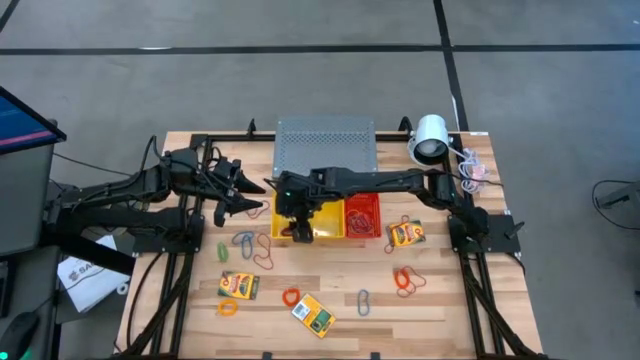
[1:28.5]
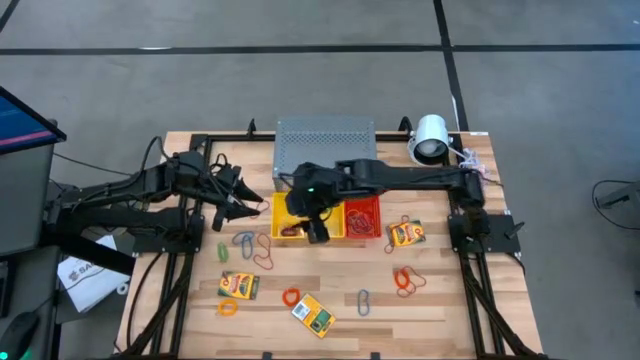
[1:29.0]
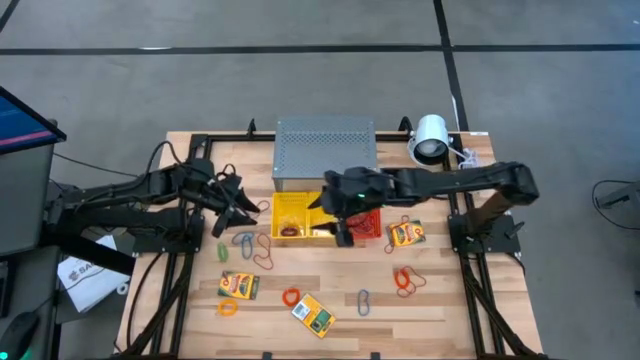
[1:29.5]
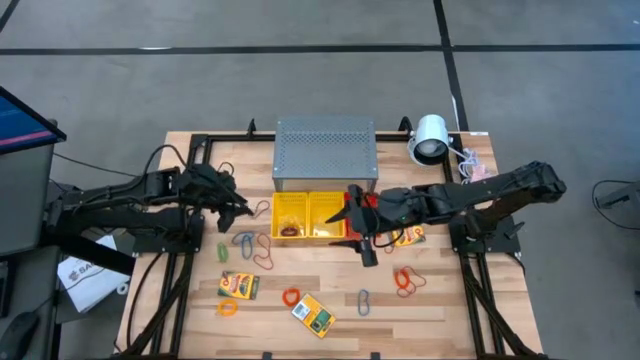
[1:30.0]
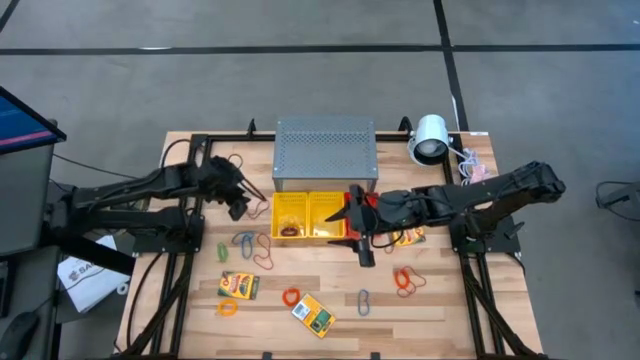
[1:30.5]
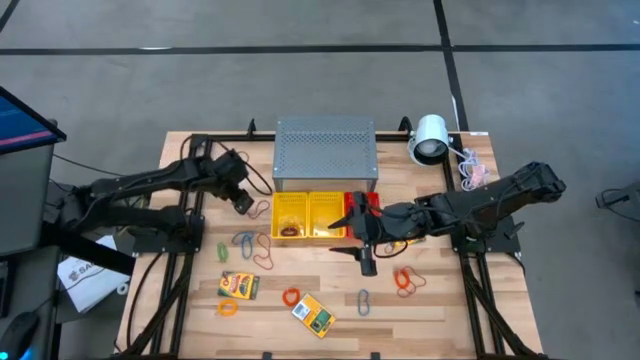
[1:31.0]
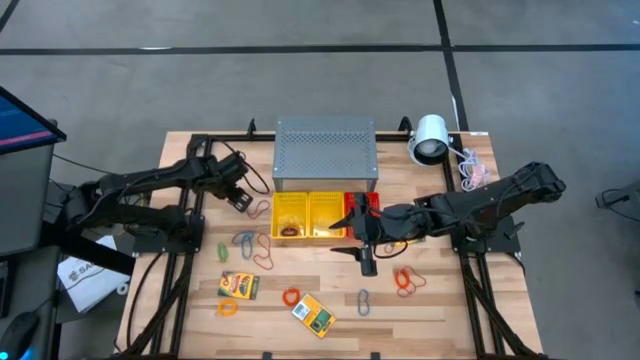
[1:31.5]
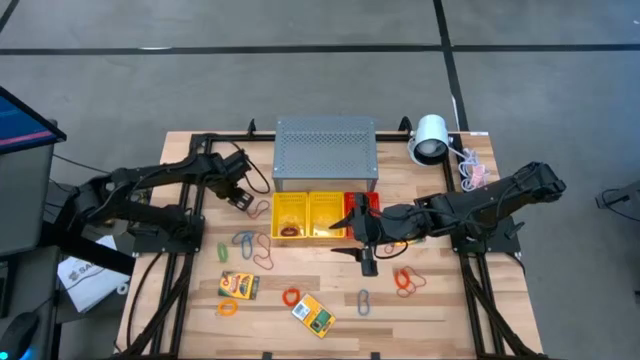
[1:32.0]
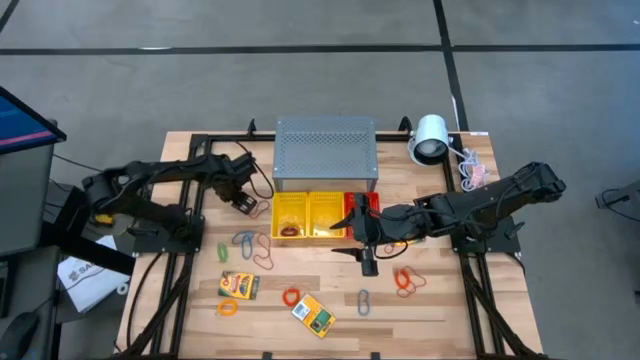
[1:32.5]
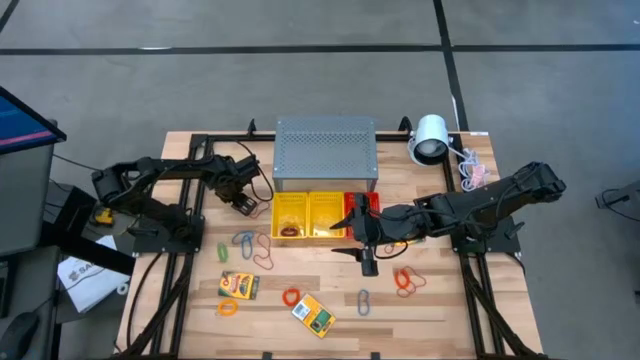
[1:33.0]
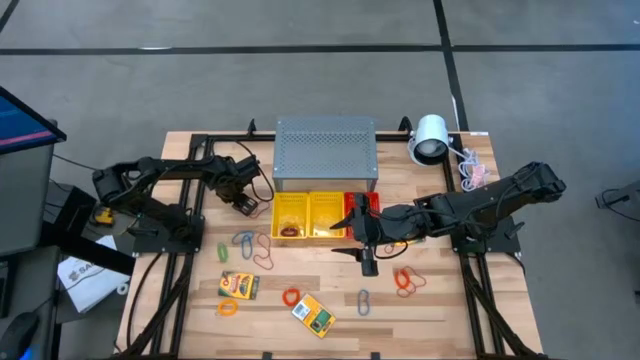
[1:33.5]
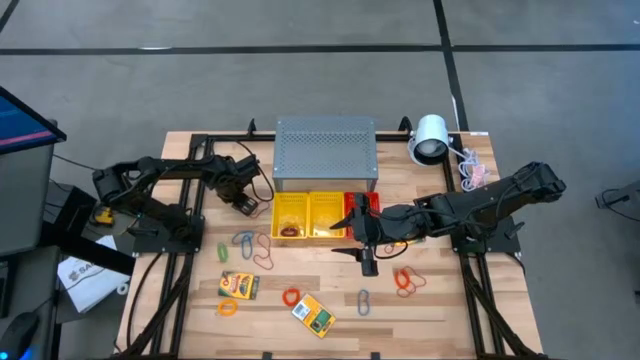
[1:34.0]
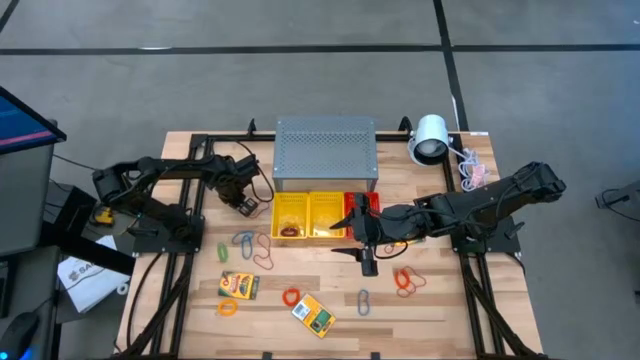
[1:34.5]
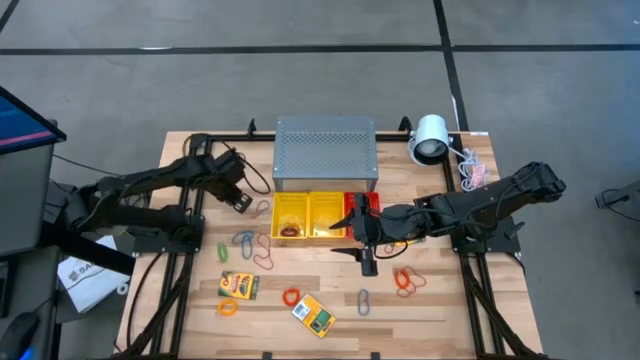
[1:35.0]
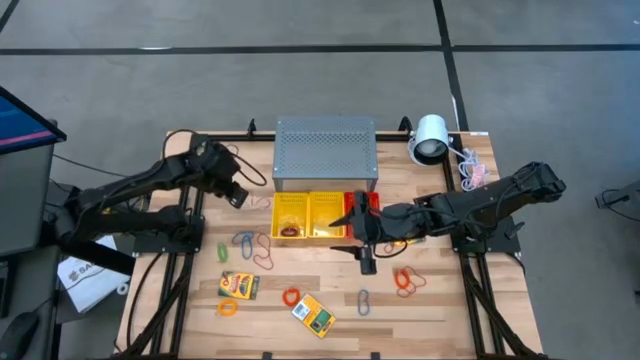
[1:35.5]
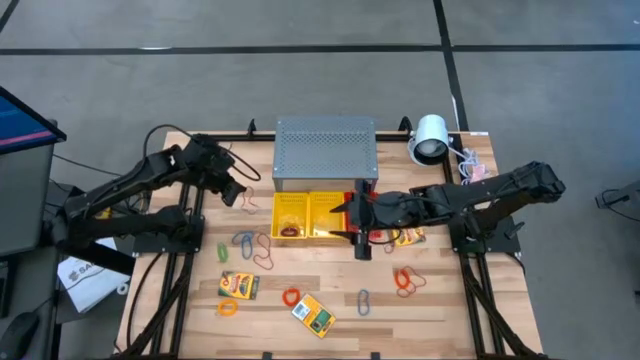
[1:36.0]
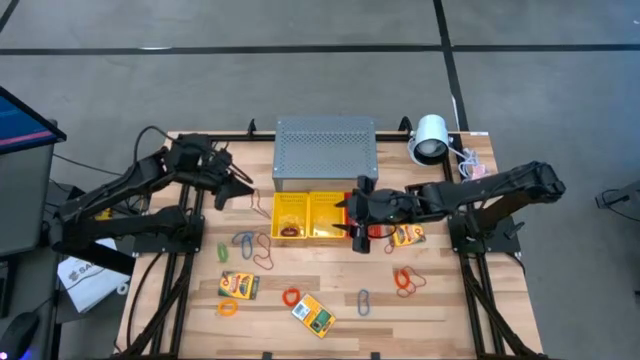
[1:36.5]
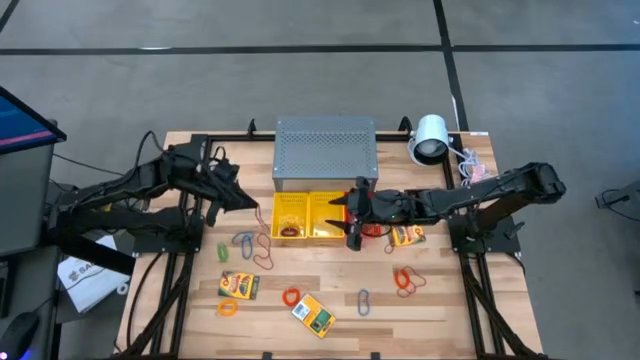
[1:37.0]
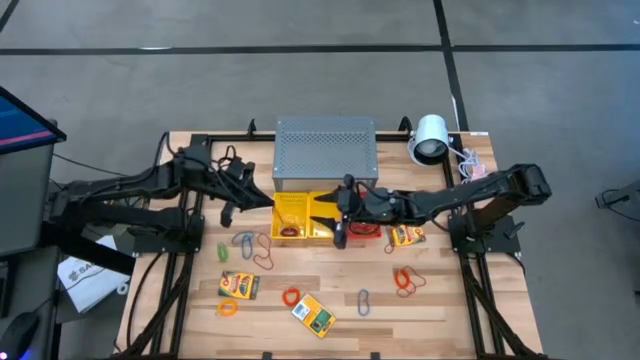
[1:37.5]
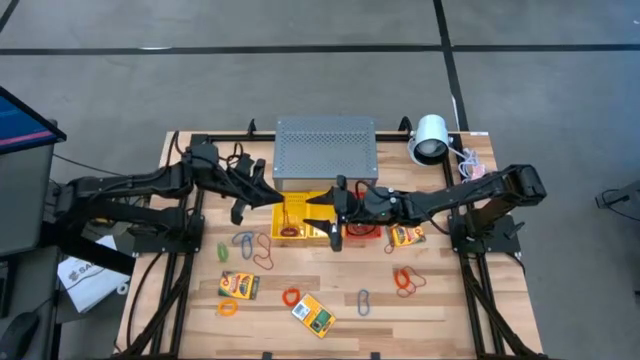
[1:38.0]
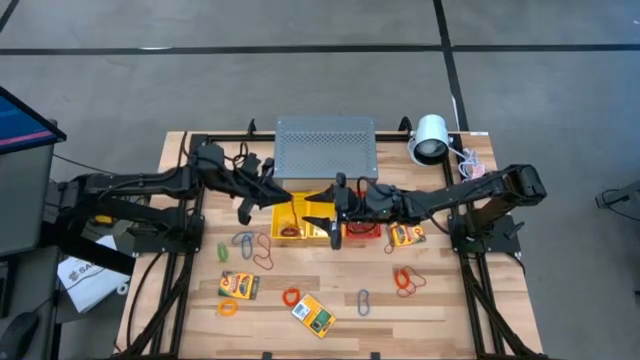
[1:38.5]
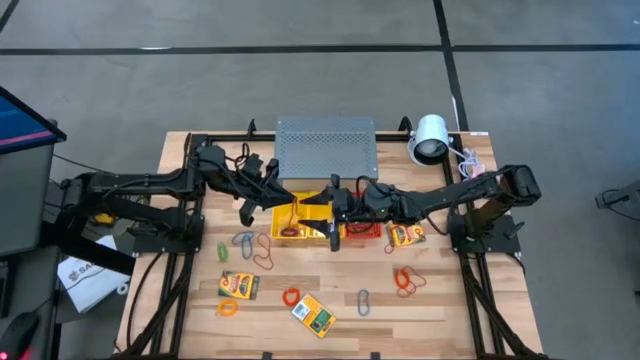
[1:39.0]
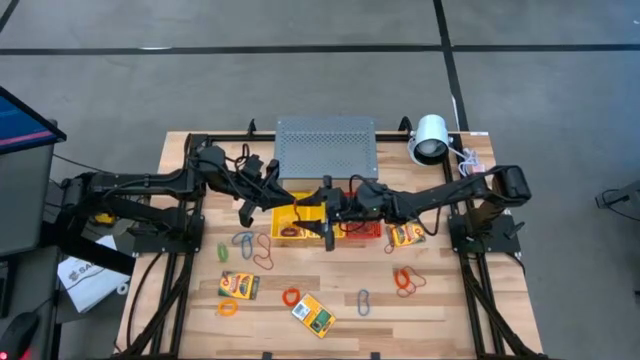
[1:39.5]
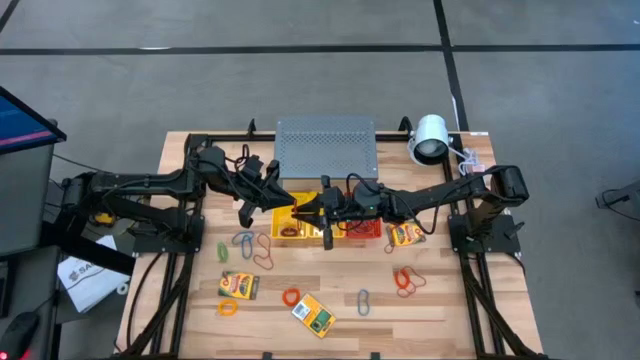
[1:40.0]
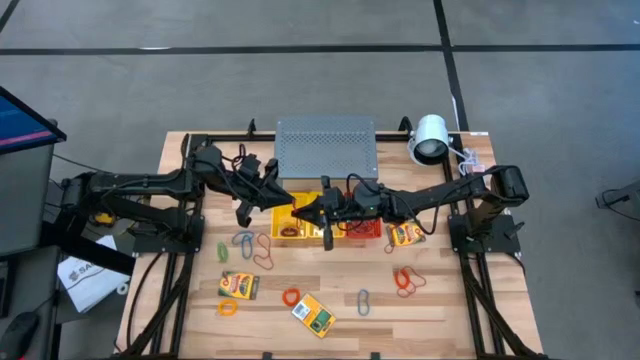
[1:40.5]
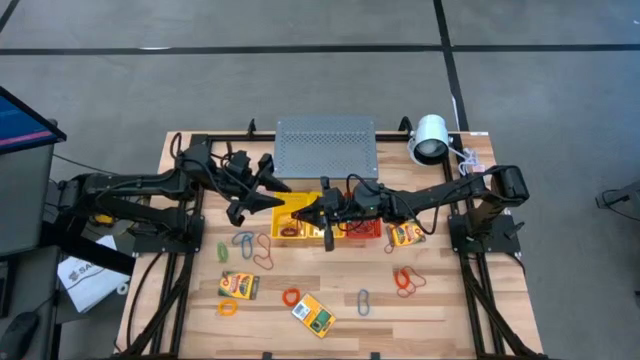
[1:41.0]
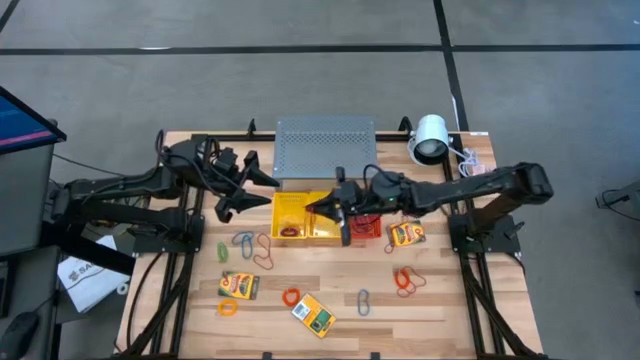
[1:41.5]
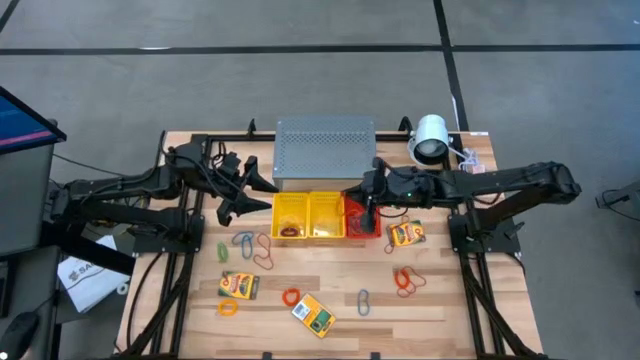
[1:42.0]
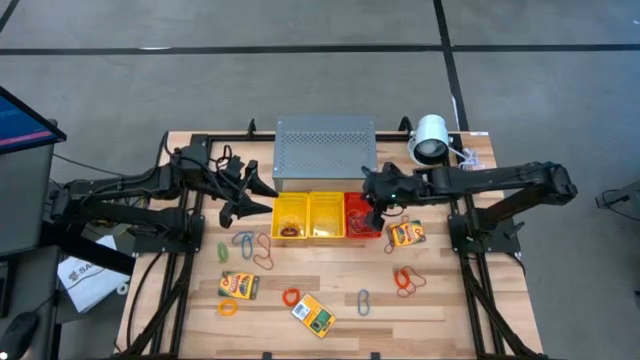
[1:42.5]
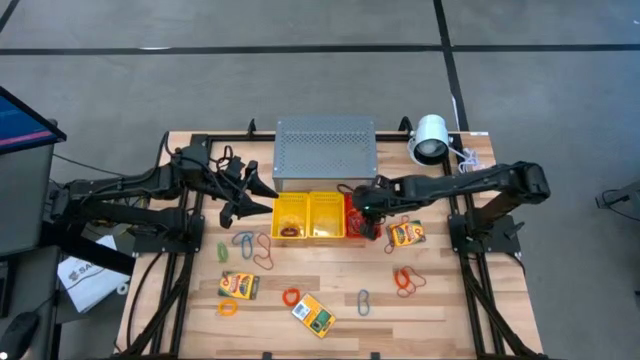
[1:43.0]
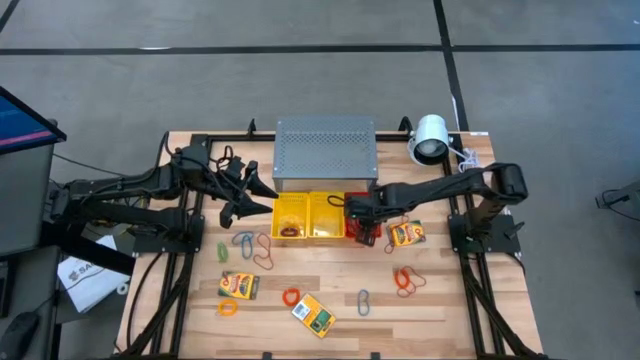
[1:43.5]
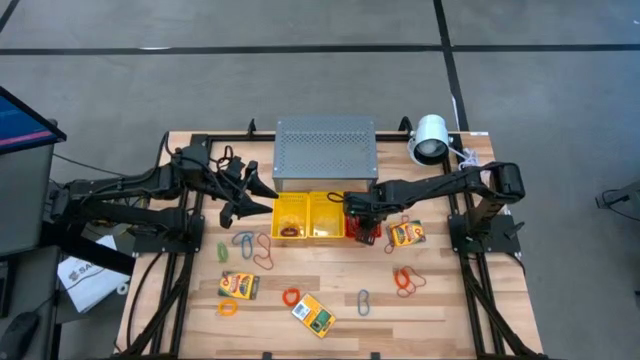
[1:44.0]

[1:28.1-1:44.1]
Task: Pick & Place Office Desk Supplies
Put the red rubber band into the red bin

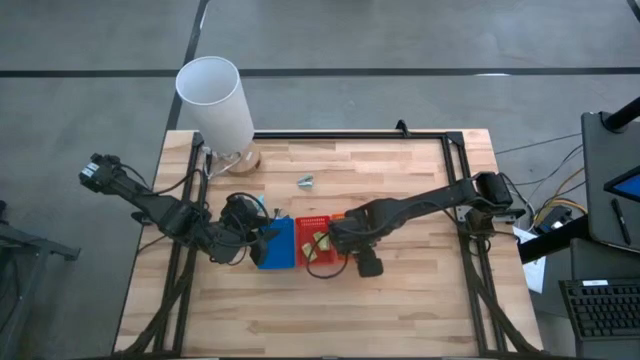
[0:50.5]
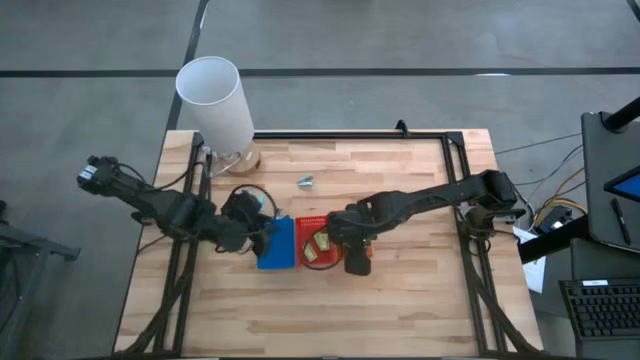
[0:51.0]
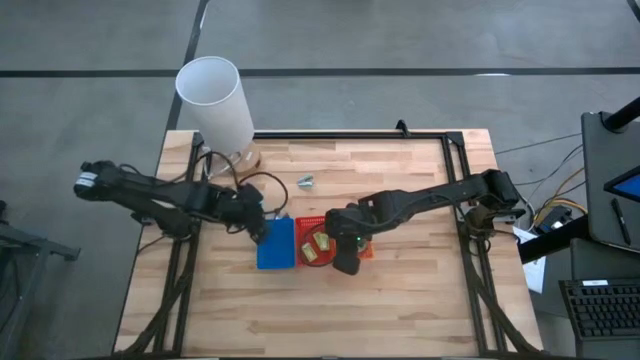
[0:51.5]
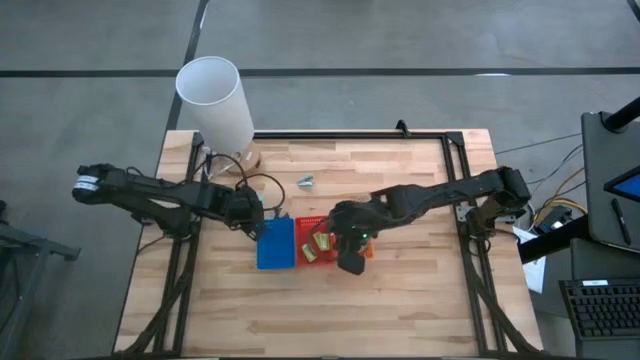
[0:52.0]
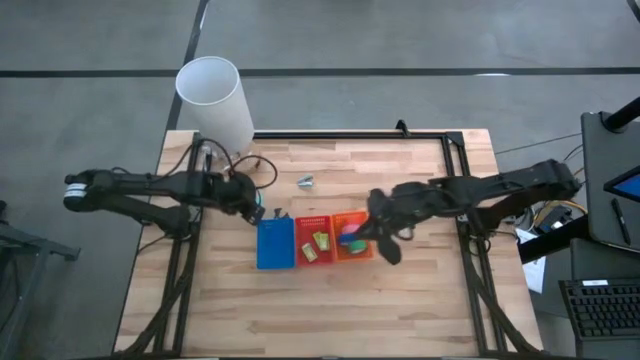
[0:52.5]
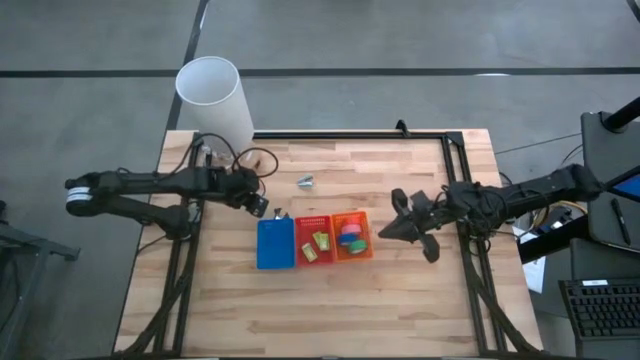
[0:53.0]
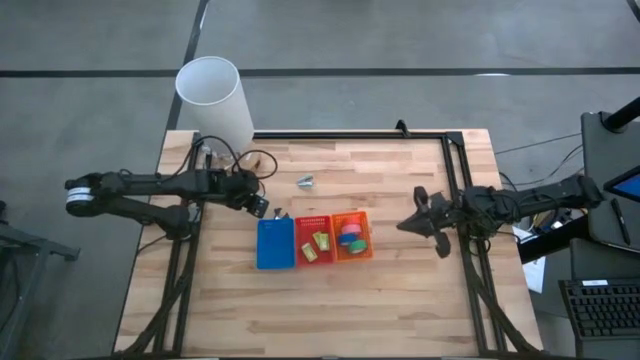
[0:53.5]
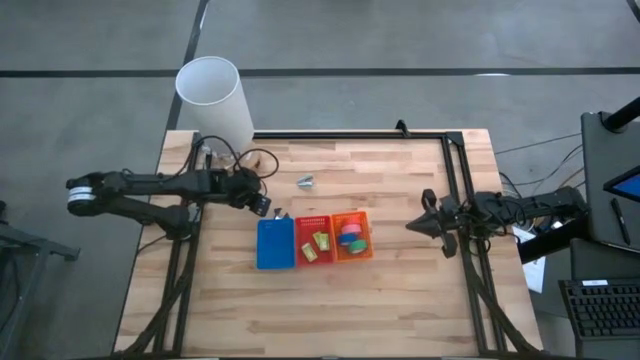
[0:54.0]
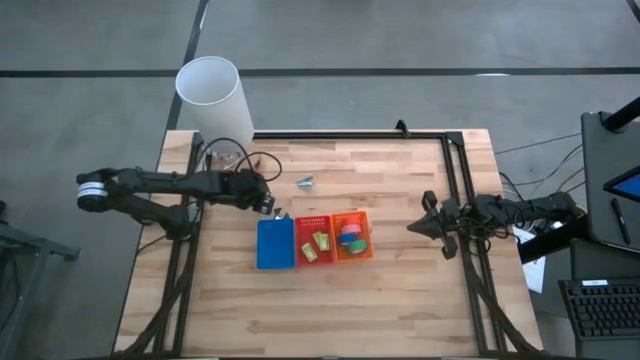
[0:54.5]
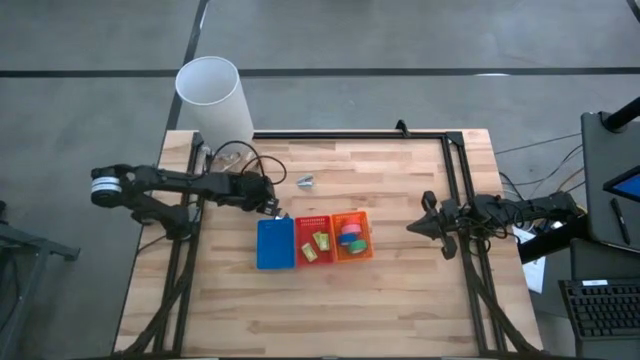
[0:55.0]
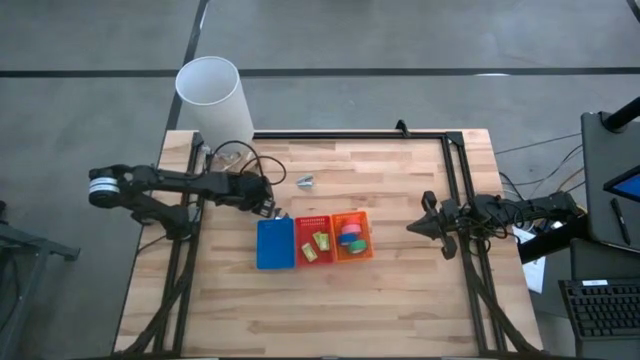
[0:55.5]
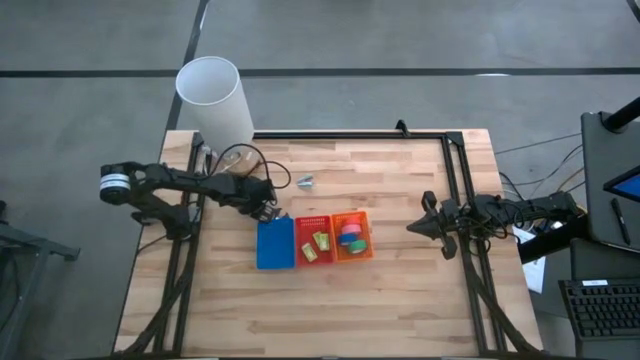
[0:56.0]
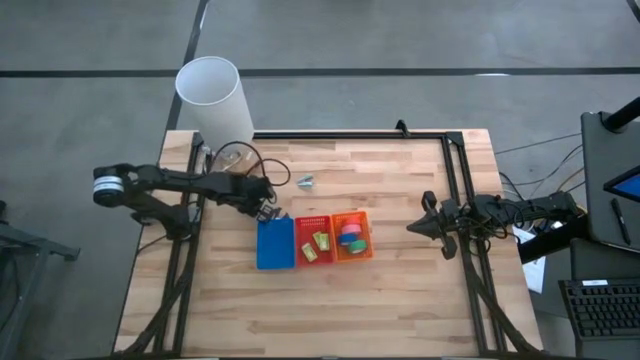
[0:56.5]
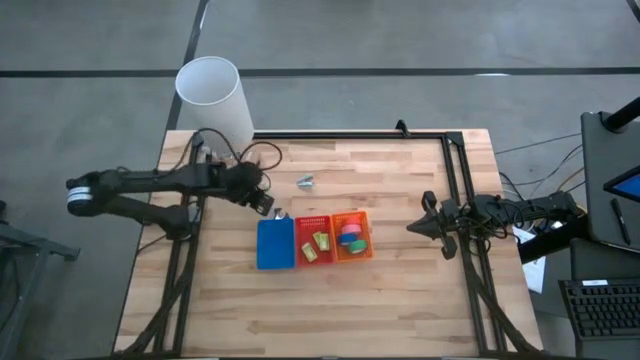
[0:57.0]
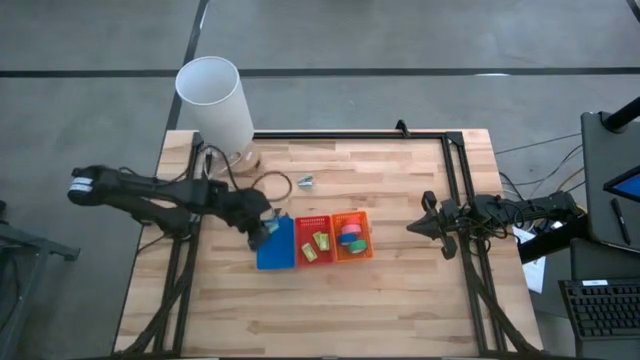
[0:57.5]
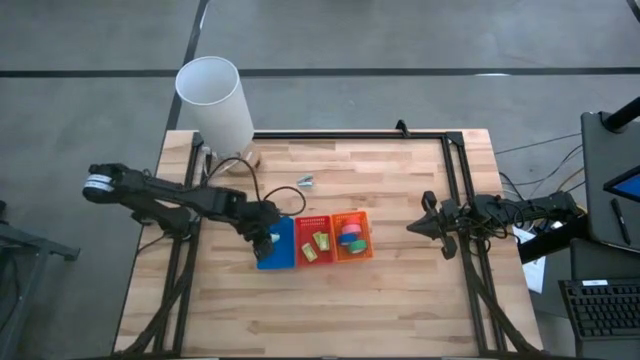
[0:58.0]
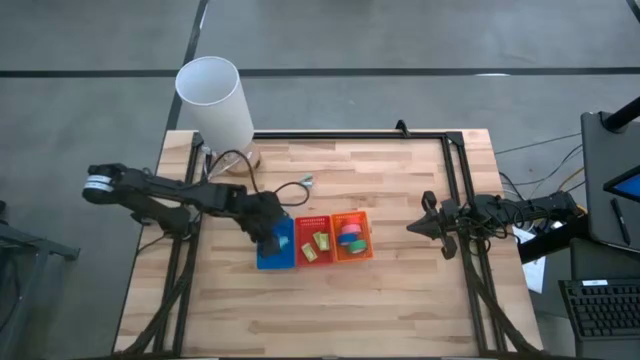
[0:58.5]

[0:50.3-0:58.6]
Task: Pick and place Stapler, Stapler remover, tape
Put the bottom light blue staple remover into the blue bin
